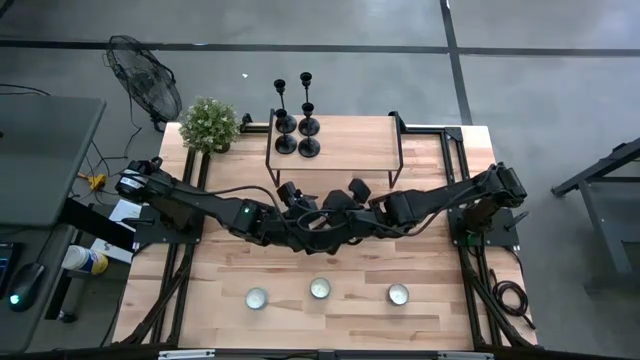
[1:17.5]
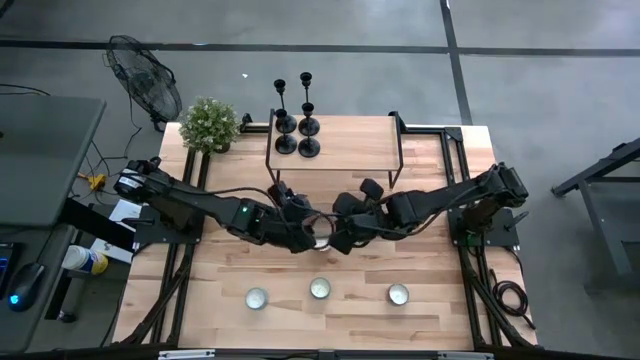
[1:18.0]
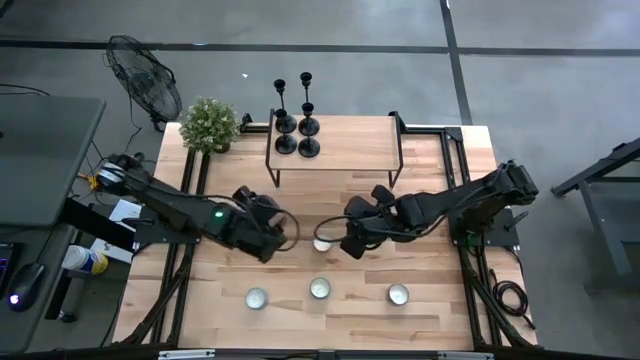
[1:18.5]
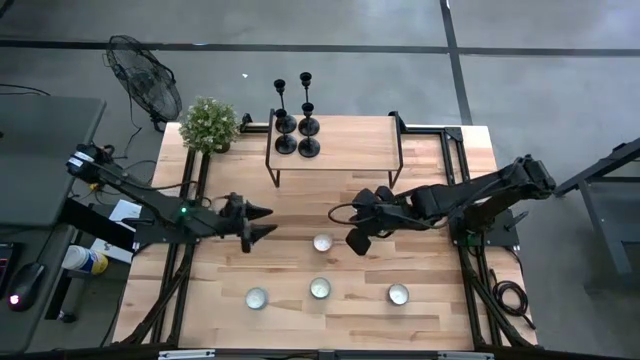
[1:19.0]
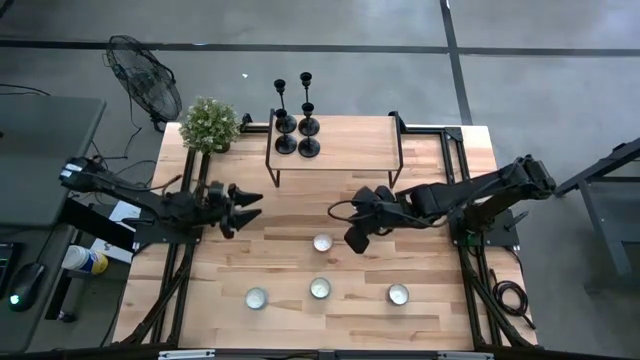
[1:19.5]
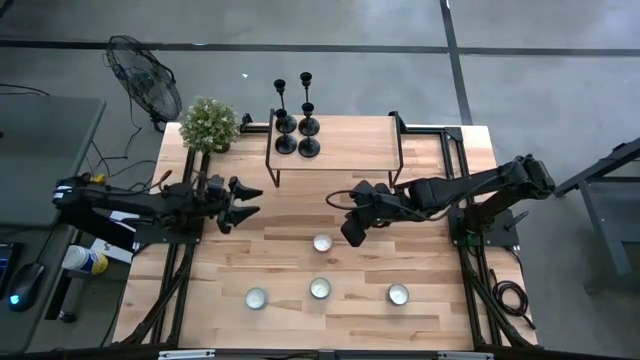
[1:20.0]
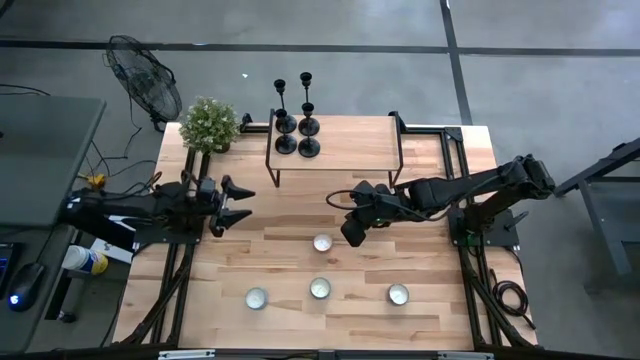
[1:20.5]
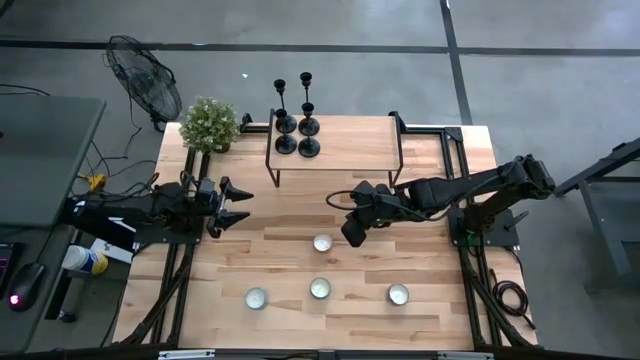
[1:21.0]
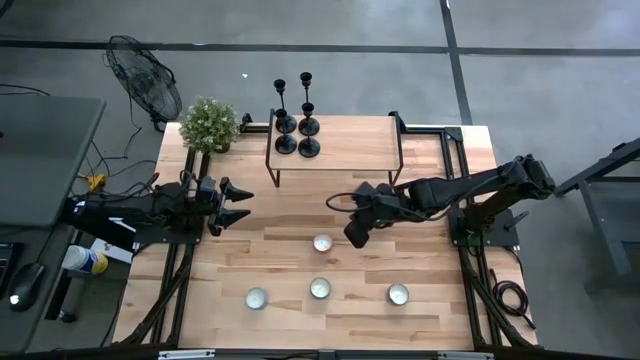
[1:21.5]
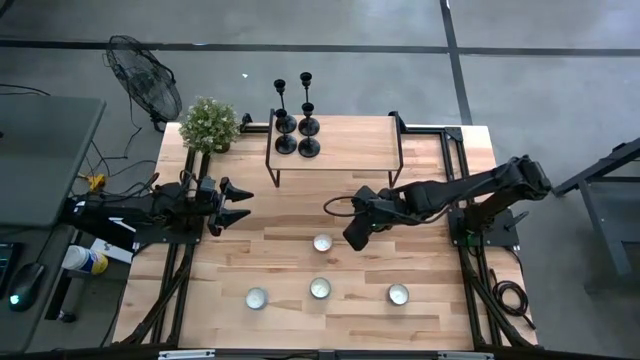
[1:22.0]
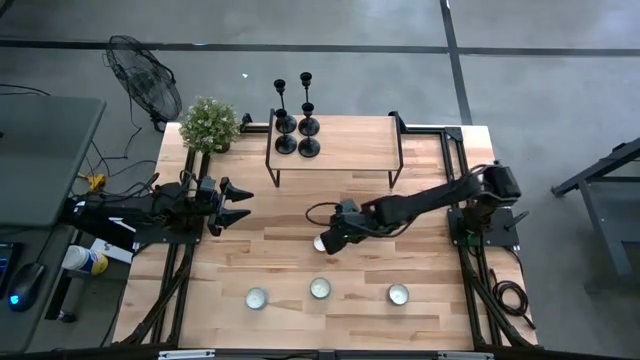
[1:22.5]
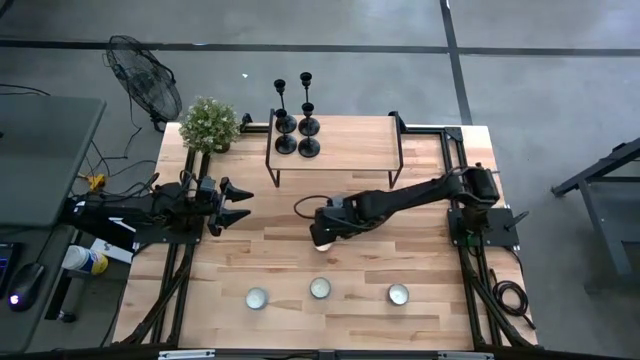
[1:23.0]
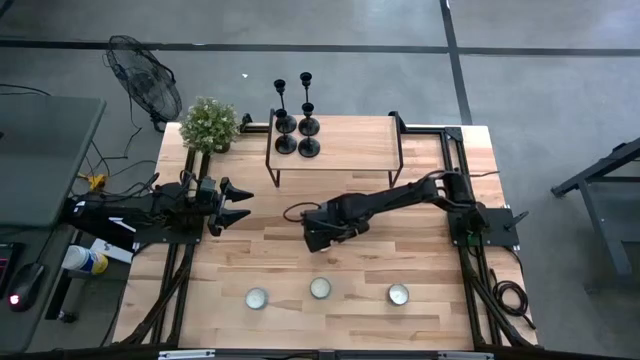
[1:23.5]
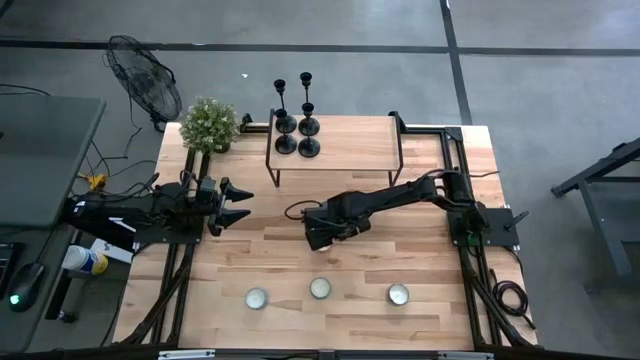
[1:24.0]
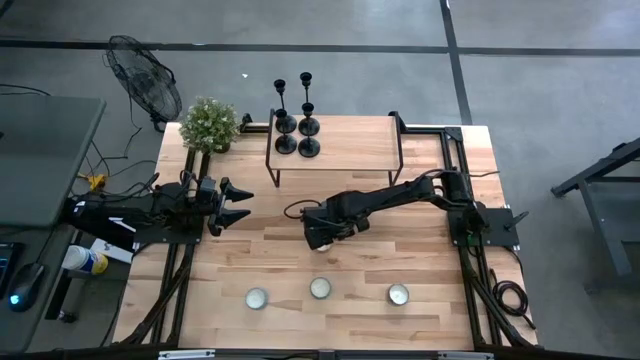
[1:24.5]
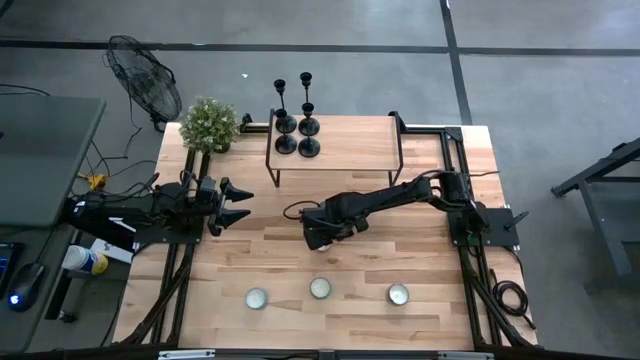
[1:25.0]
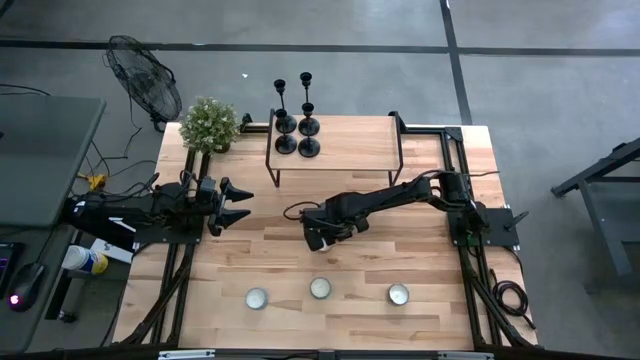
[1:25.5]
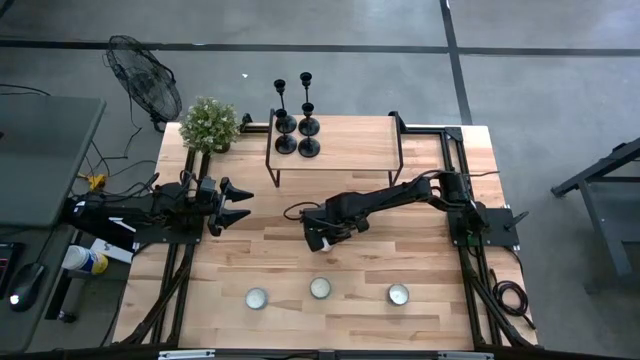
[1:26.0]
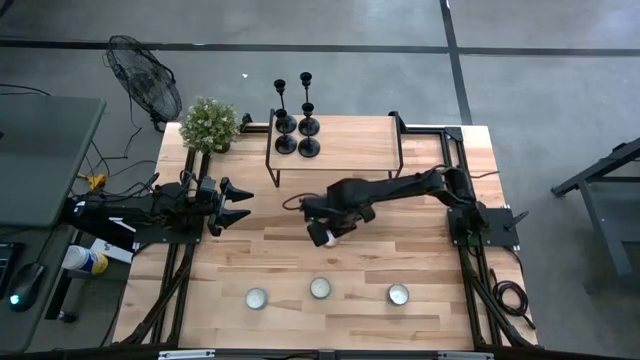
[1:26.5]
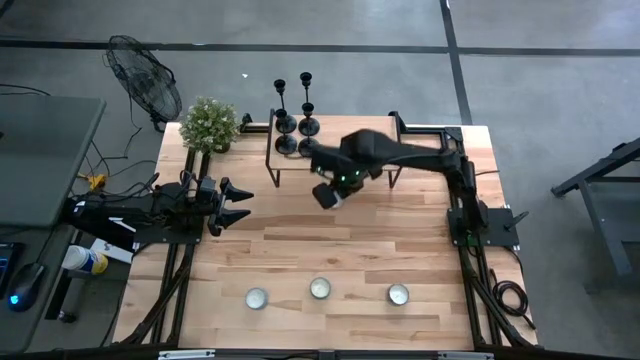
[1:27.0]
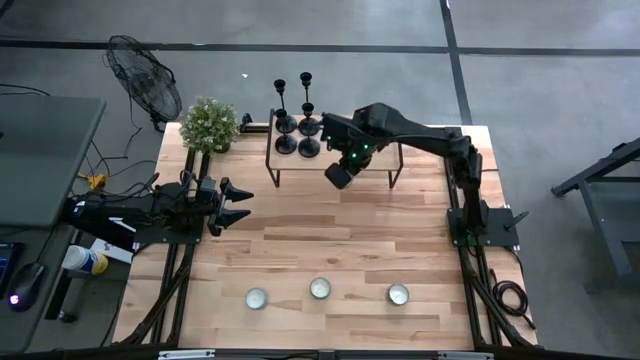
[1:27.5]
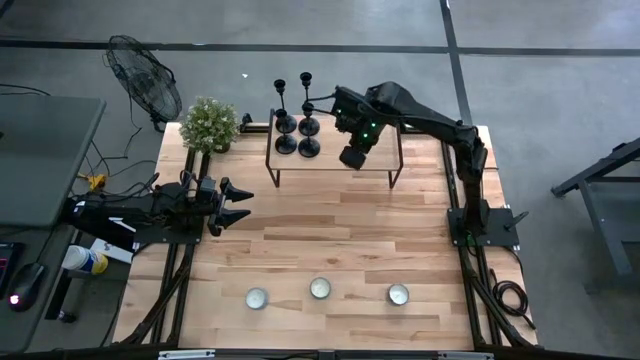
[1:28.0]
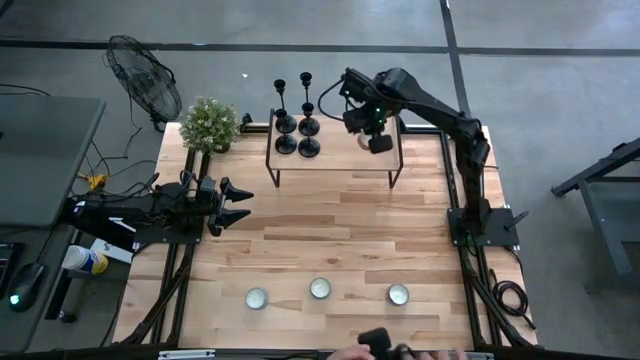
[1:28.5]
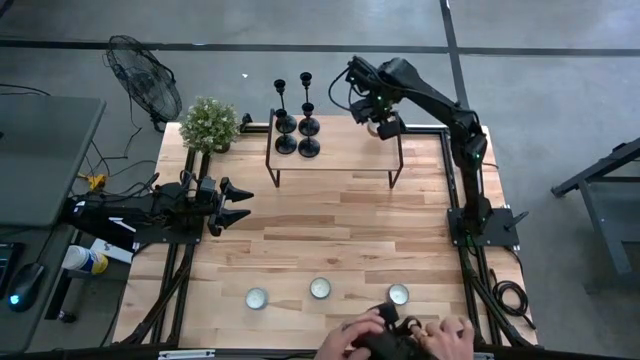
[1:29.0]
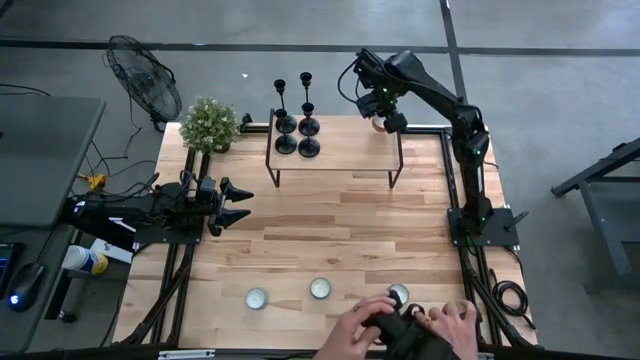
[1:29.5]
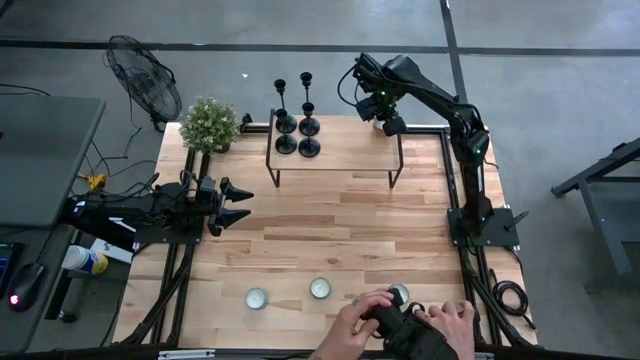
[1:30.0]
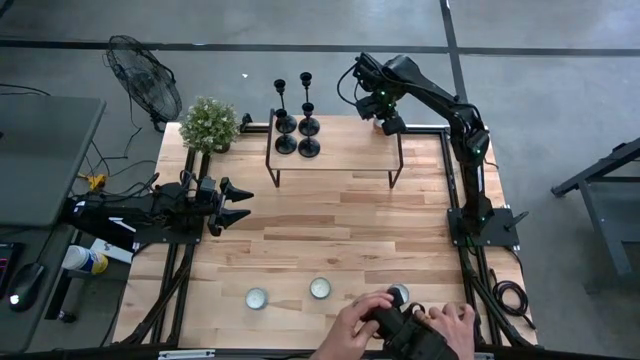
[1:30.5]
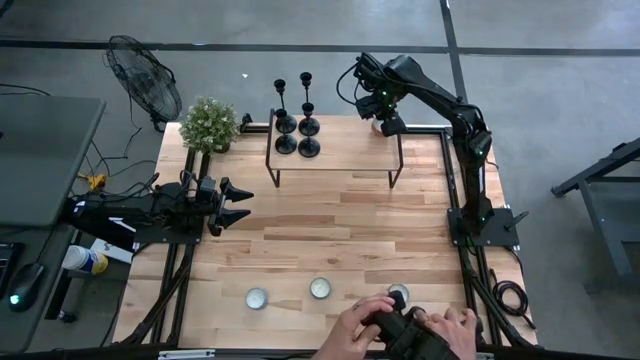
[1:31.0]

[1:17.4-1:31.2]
Task: Pick & Place candle stick holders
Put the orange scented candle on the shelf

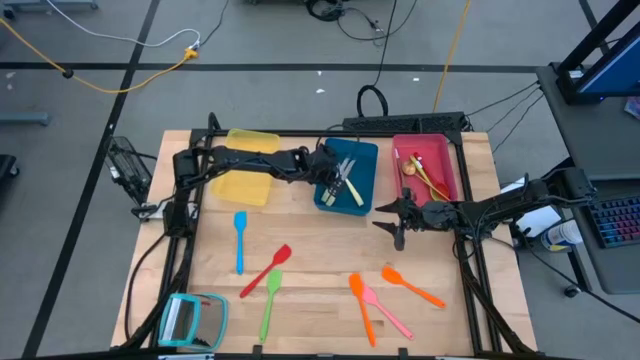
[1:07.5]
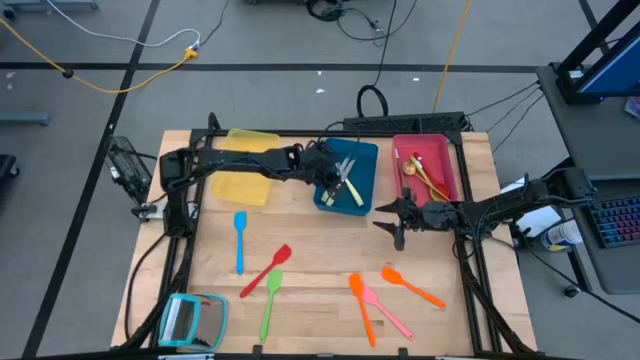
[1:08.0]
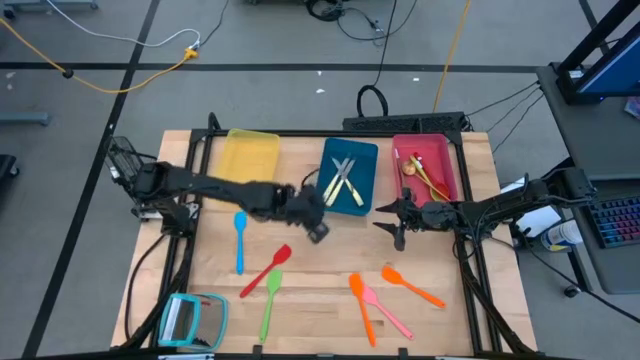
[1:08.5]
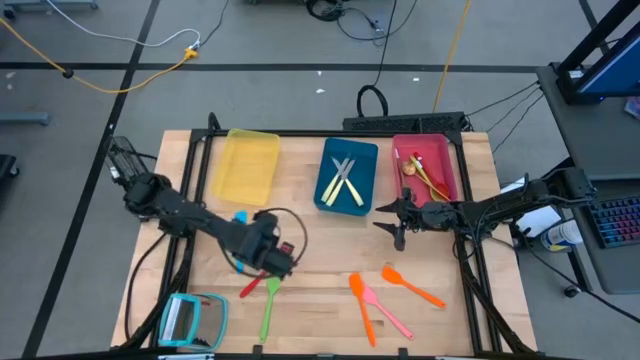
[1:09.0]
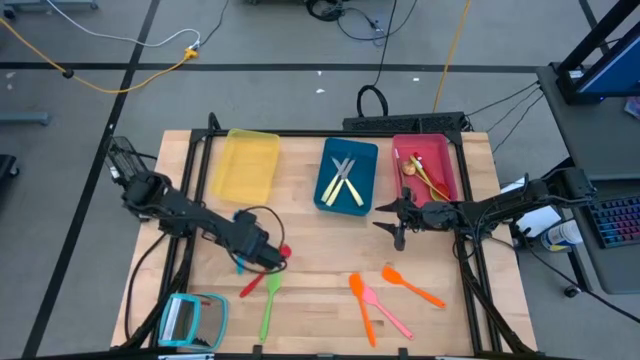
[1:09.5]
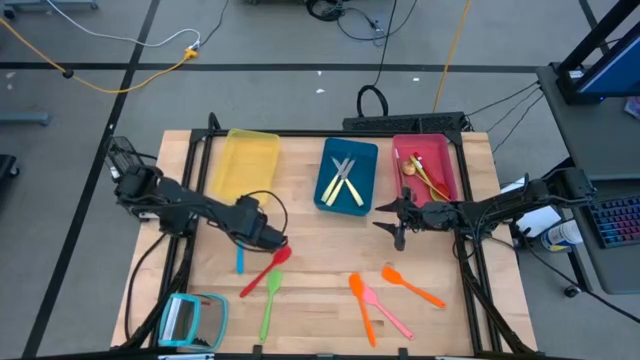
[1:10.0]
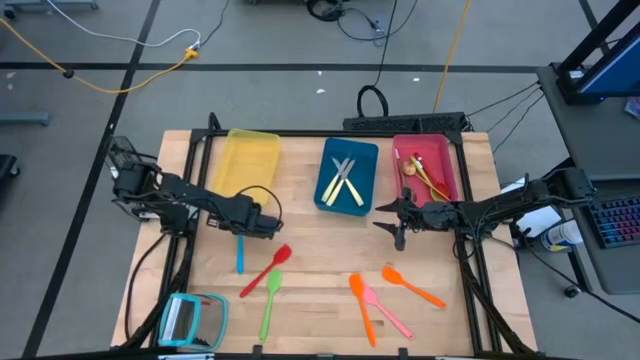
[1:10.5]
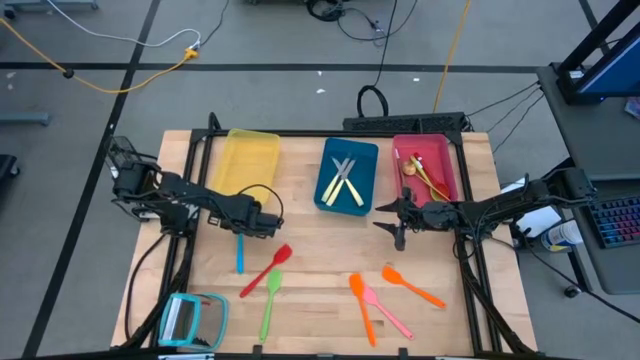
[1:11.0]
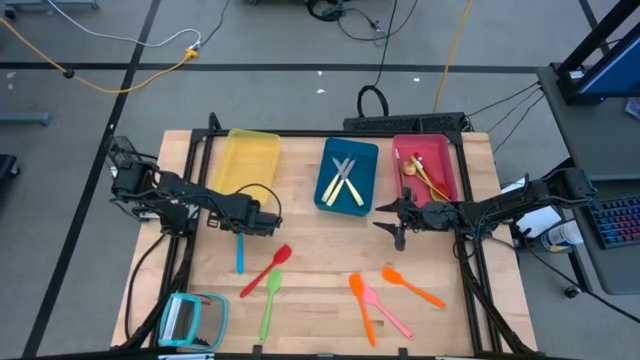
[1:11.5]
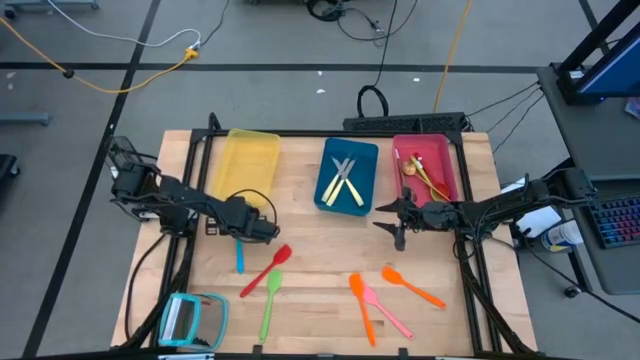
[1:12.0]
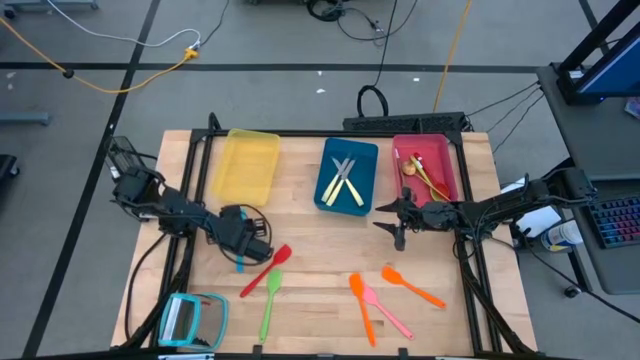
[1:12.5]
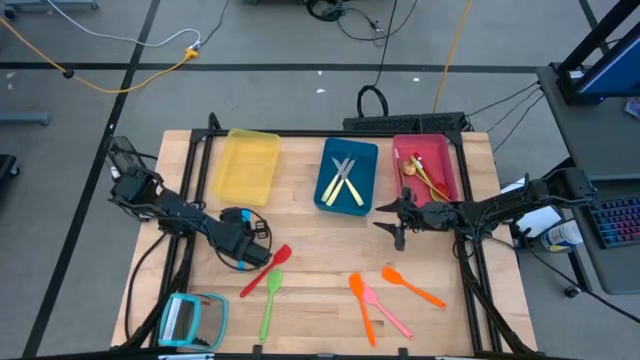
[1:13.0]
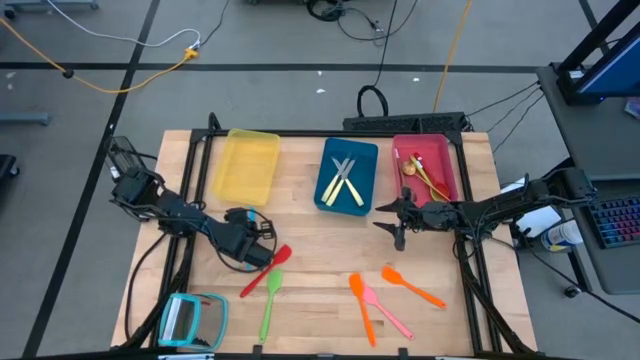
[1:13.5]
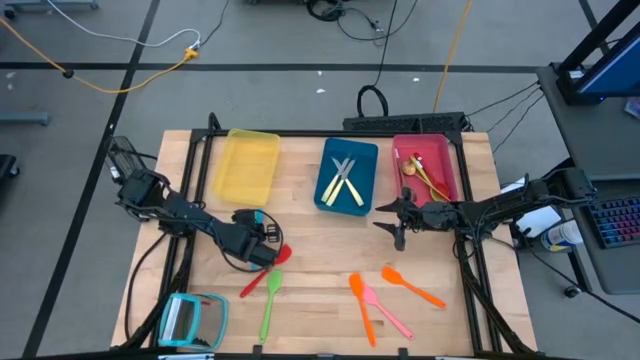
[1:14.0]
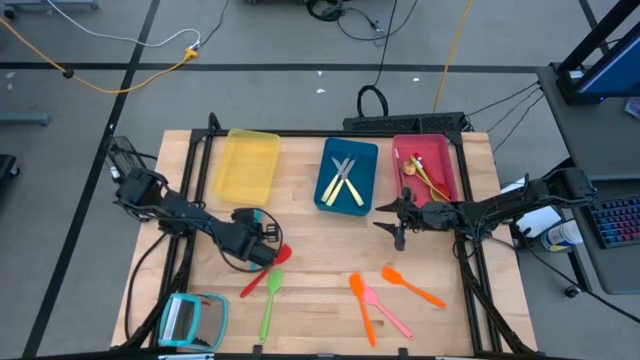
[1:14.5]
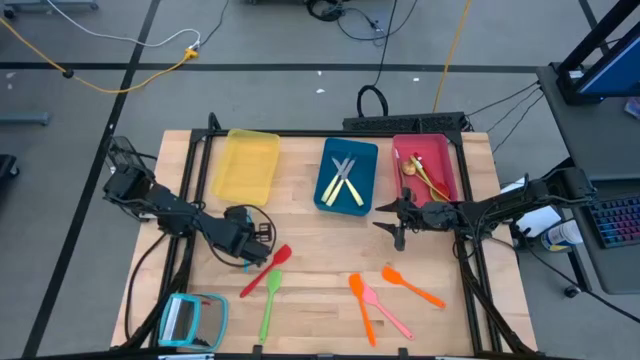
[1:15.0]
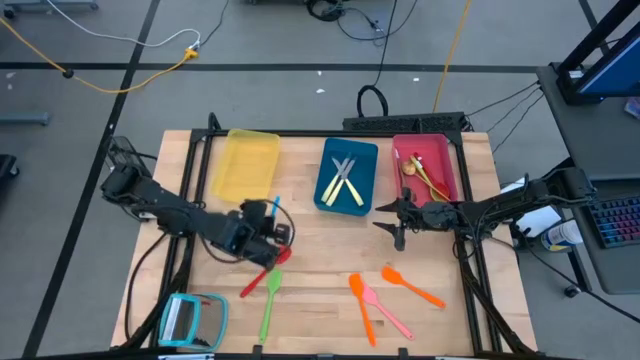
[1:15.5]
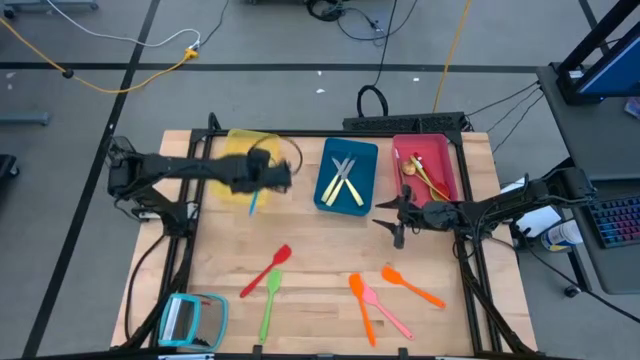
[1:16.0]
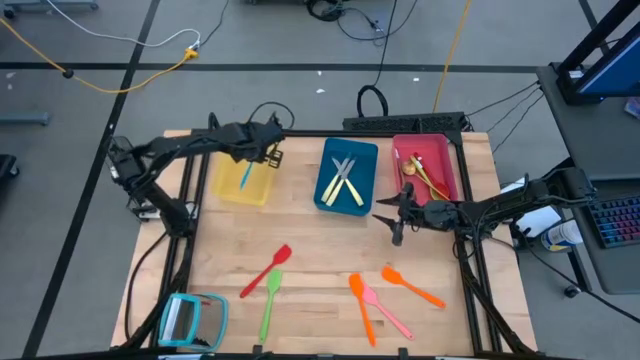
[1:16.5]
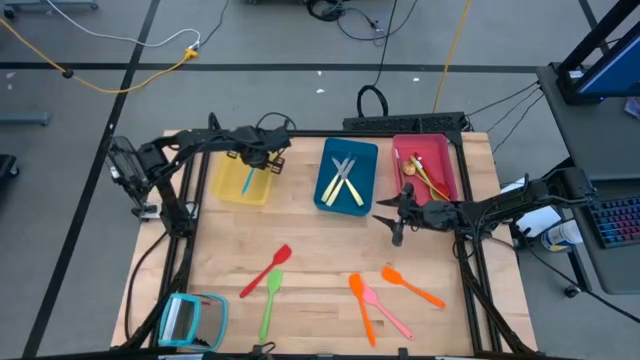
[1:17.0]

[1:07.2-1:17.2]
Task: Pick & Place Kitchen Items
Put the blue spatula into the yellow bin
